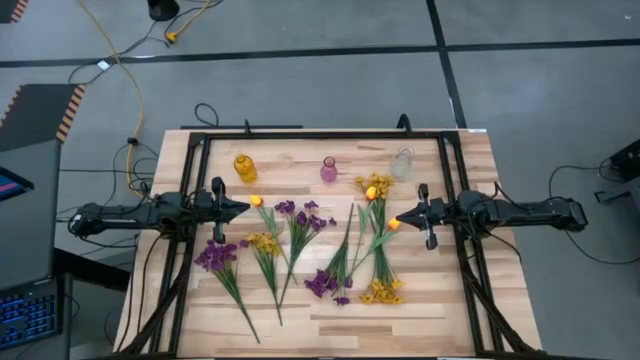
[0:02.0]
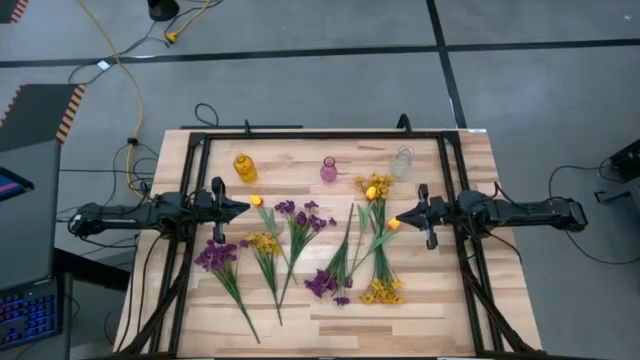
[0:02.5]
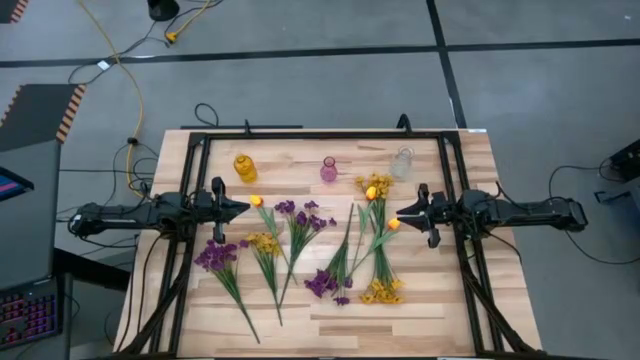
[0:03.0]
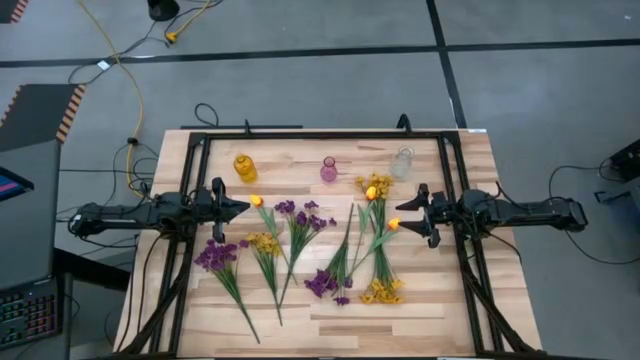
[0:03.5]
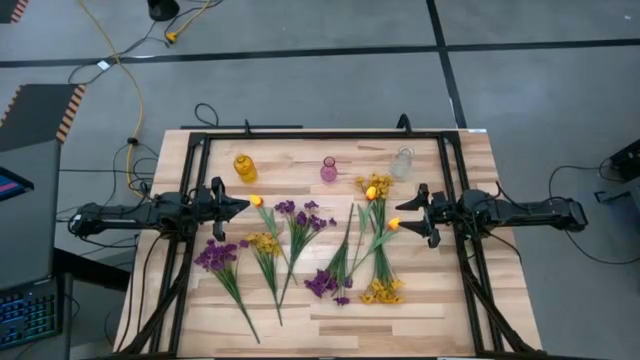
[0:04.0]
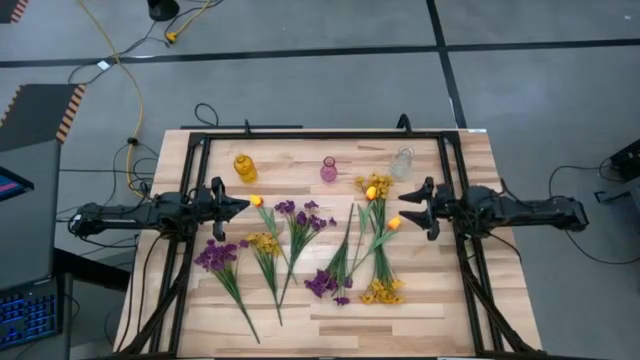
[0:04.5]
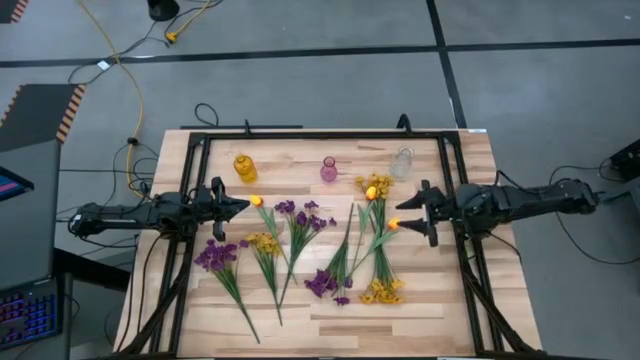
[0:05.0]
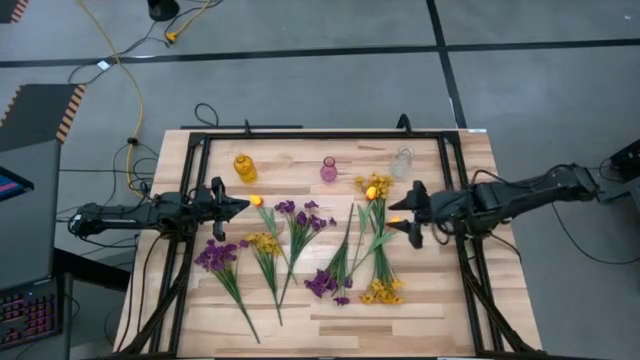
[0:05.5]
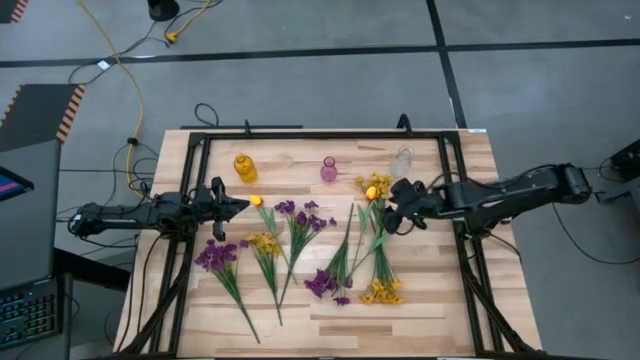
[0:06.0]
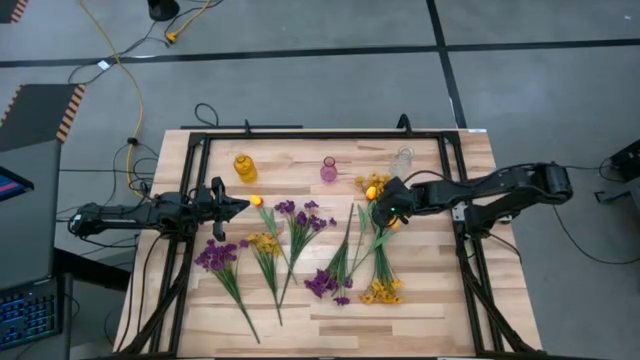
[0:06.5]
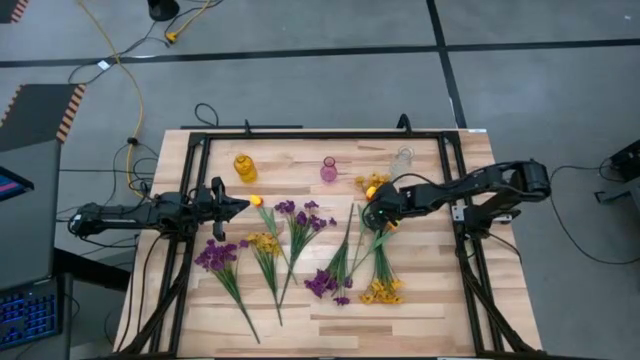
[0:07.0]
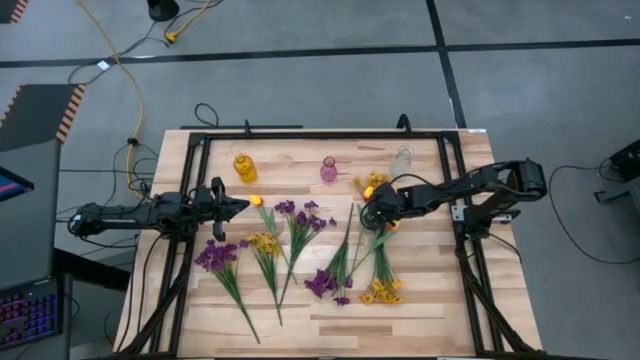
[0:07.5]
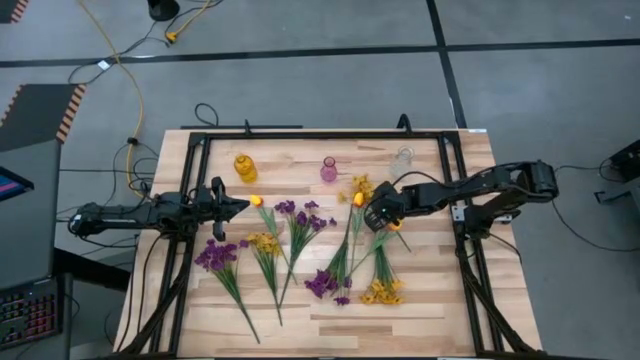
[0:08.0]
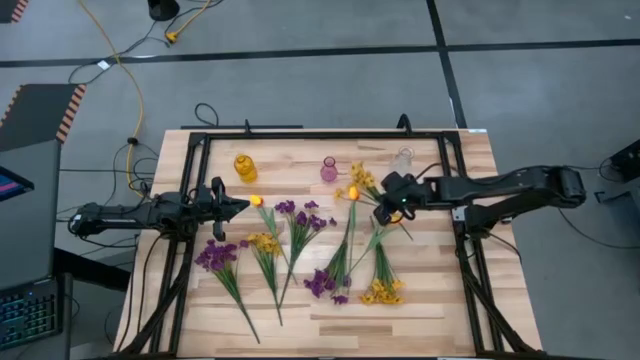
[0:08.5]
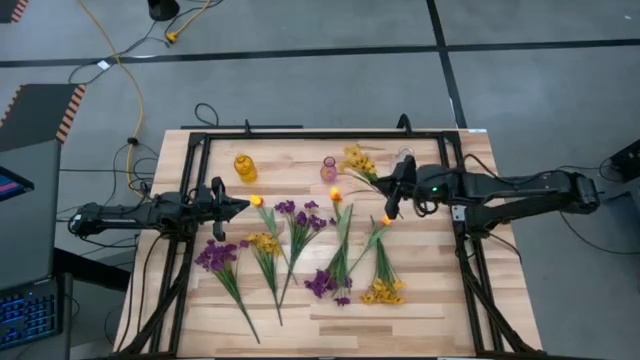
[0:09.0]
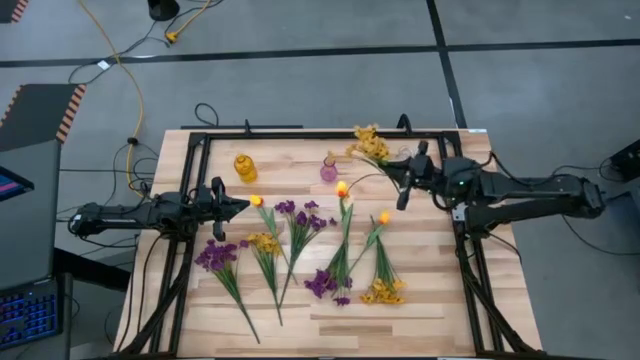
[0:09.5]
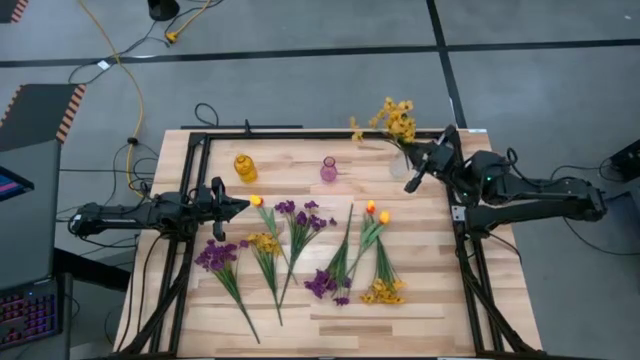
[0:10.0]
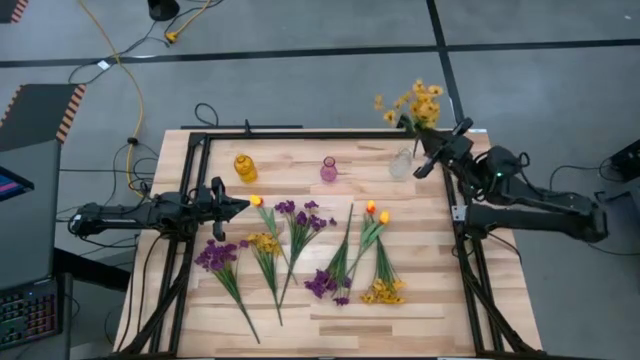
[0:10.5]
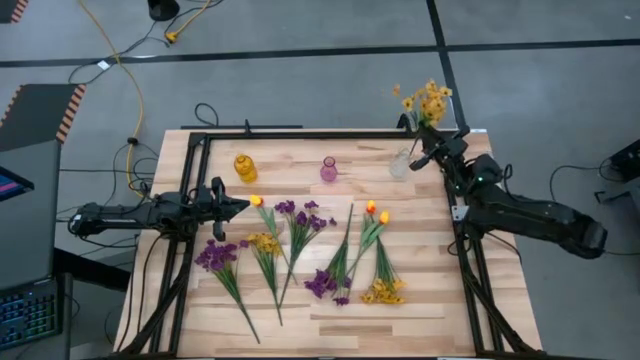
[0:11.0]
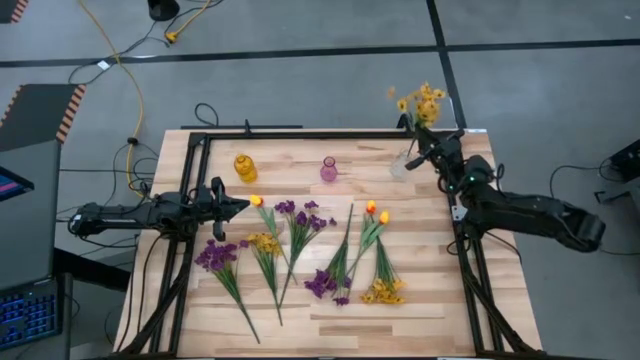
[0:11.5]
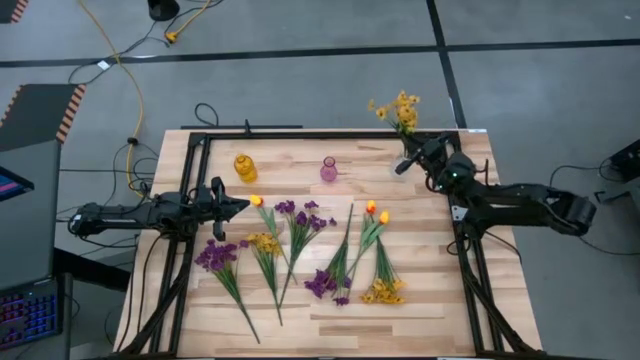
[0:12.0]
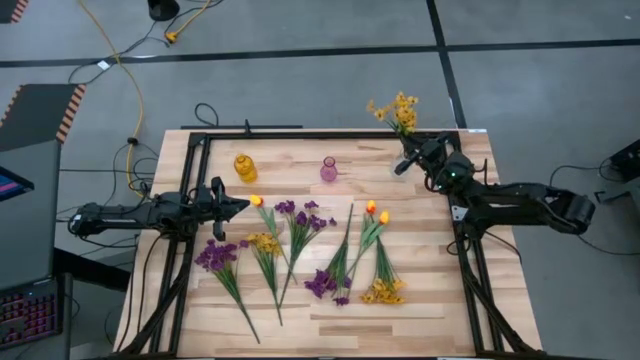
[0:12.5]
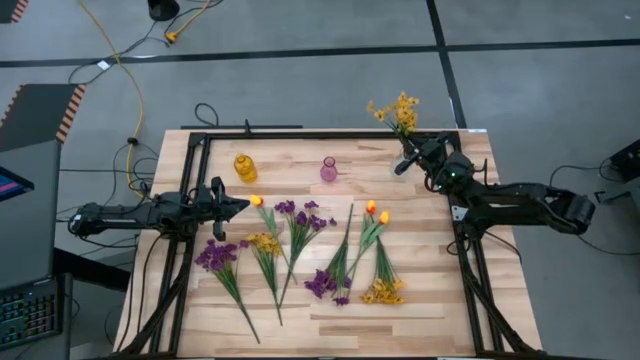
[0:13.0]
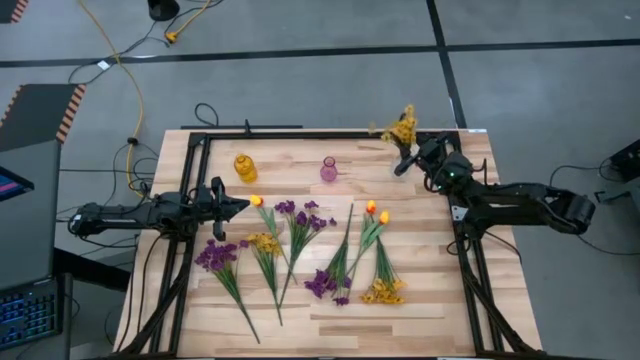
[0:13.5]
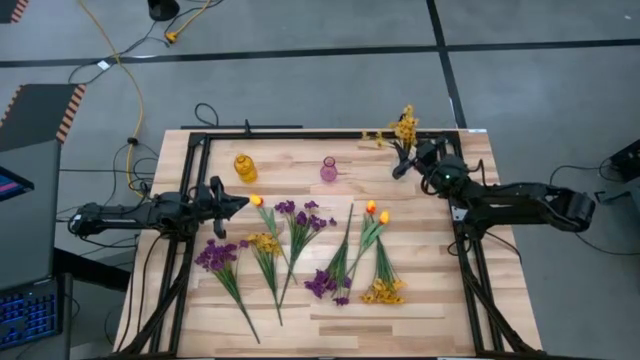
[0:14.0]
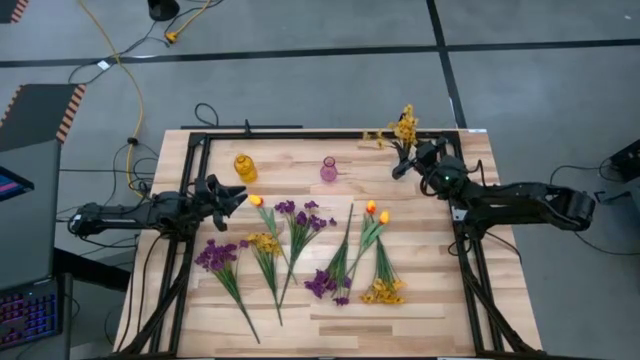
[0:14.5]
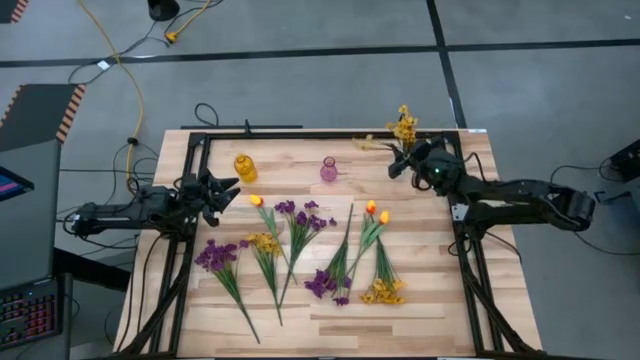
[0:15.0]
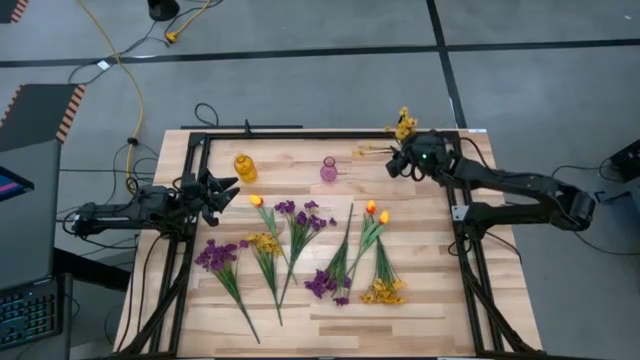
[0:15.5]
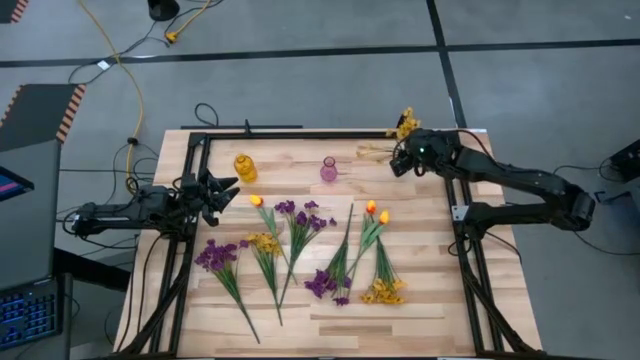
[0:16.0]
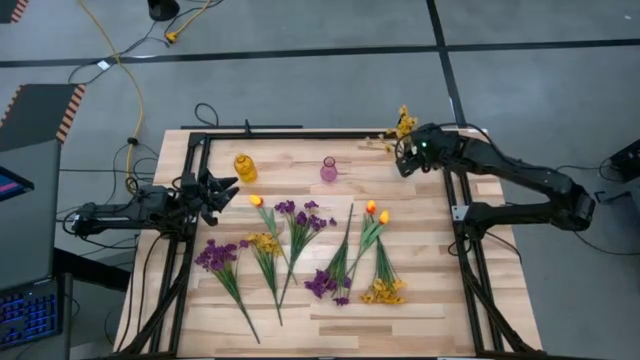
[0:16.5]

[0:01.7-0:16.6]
Task: Sort flowers into vase by color
Put the top yellow flowers into the transparent vase
